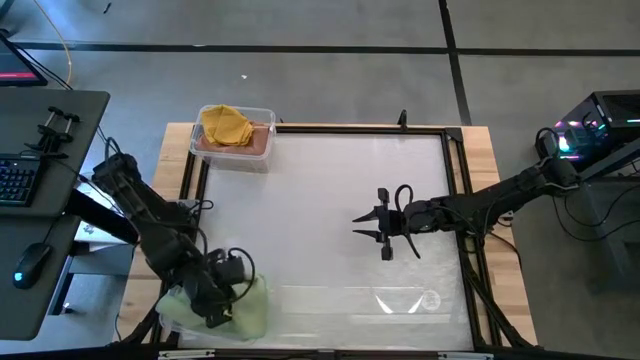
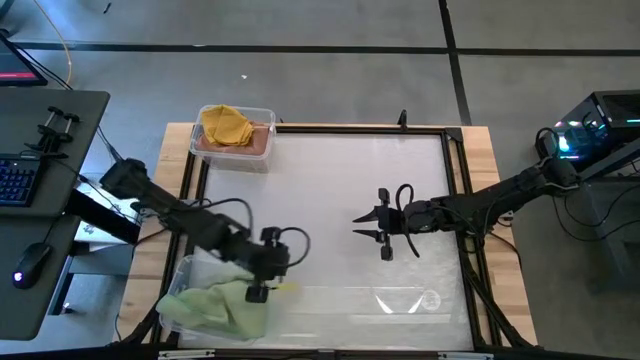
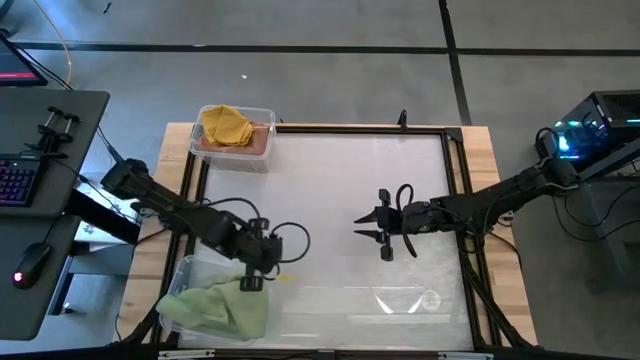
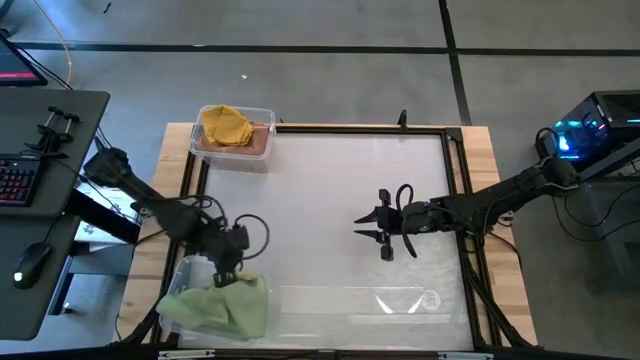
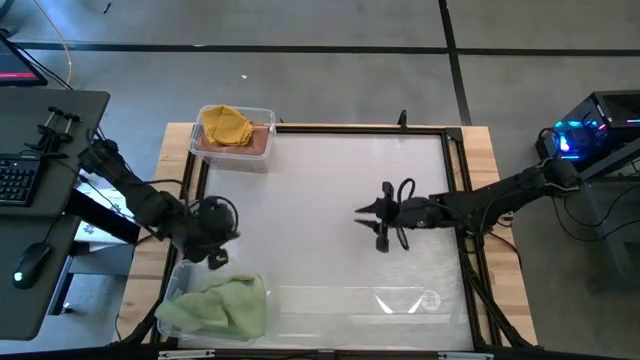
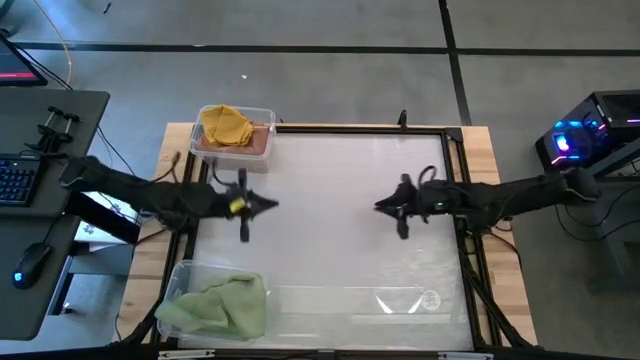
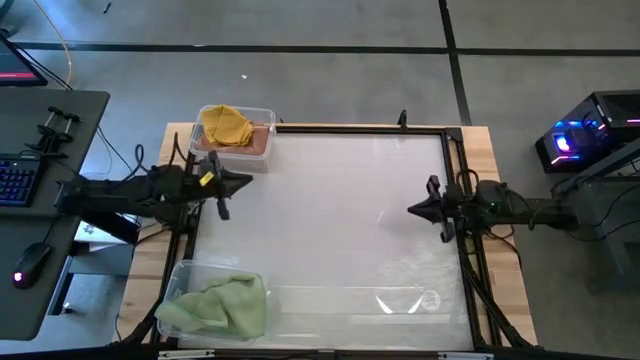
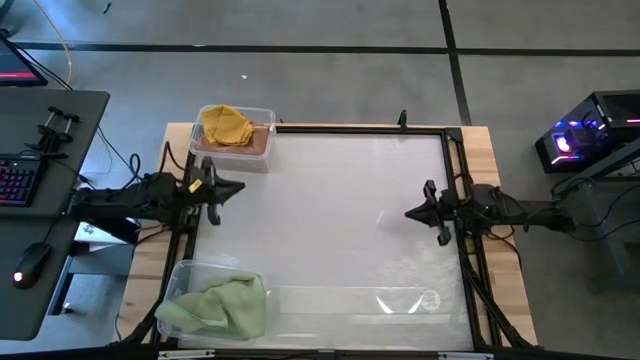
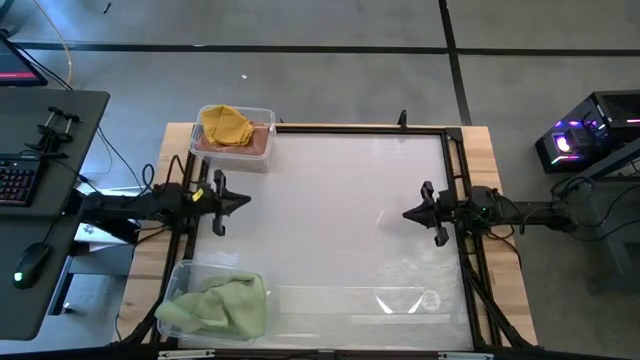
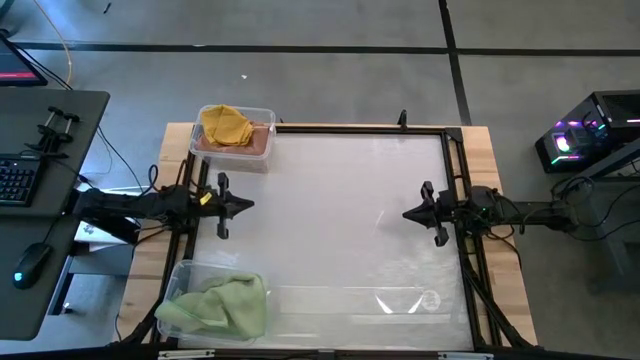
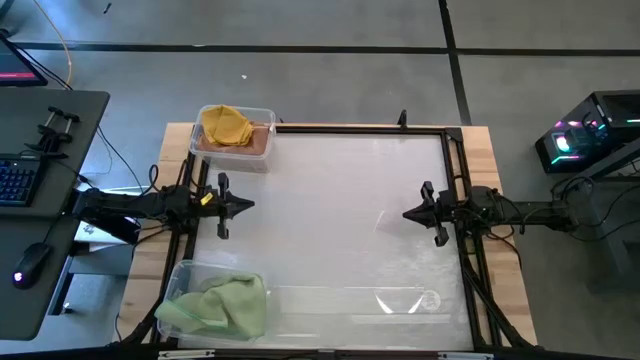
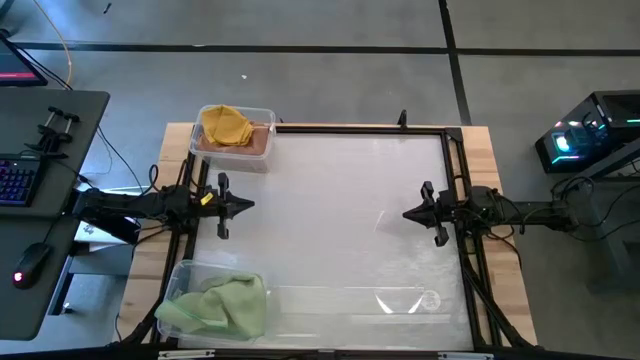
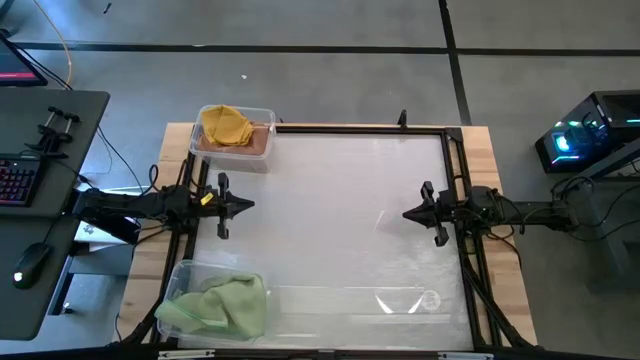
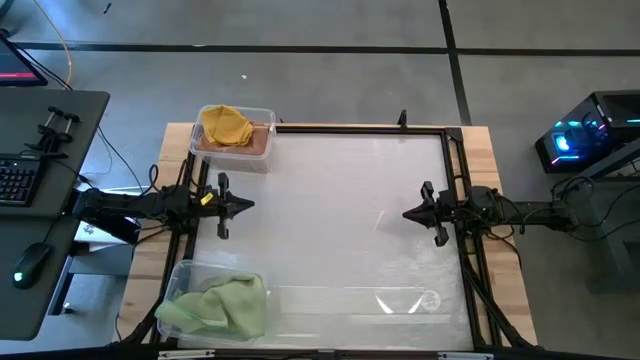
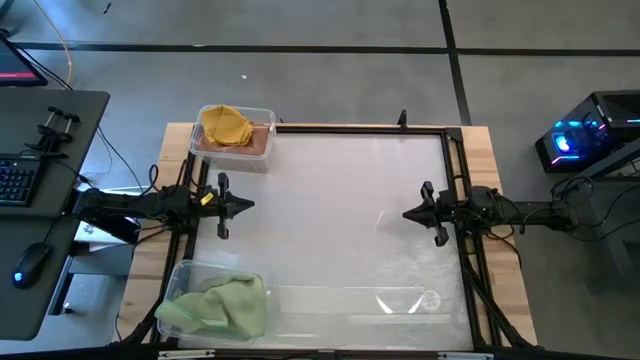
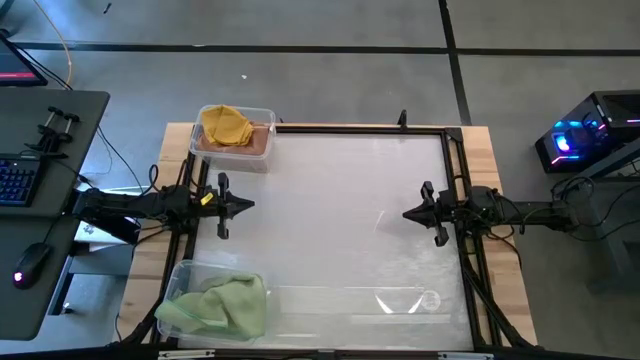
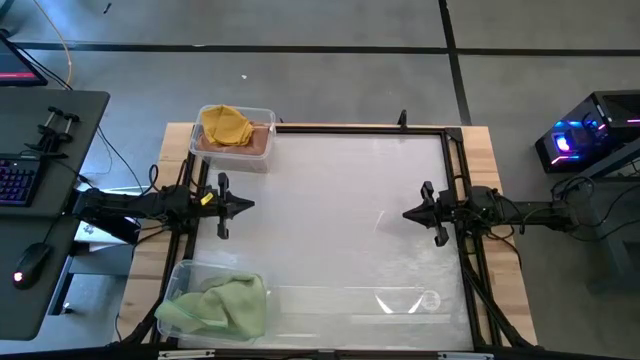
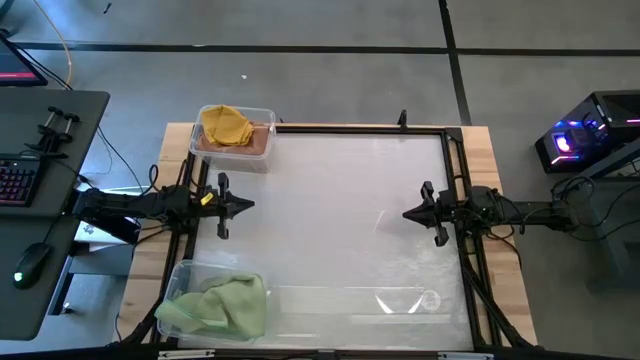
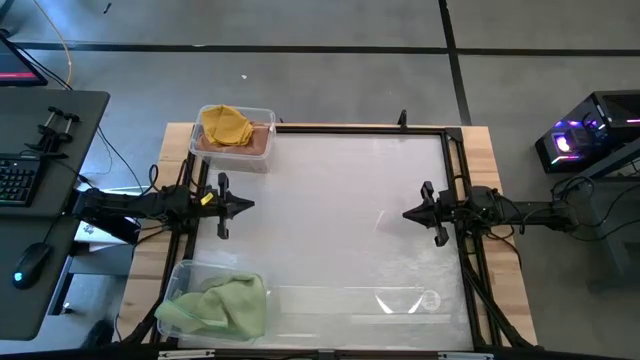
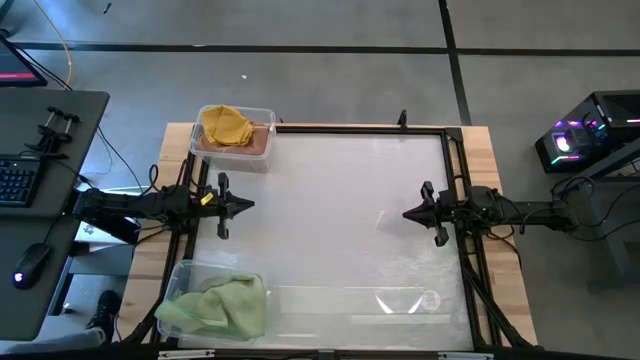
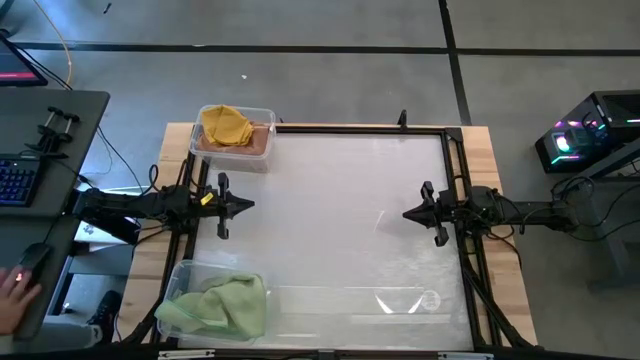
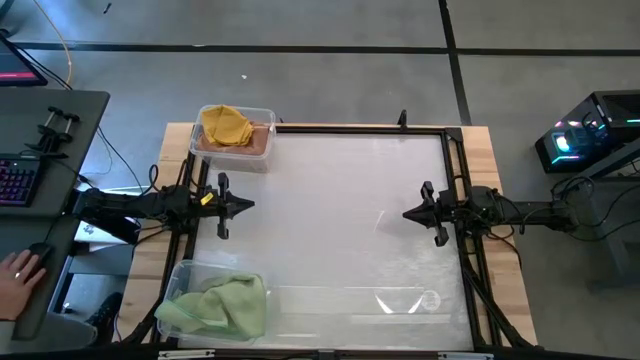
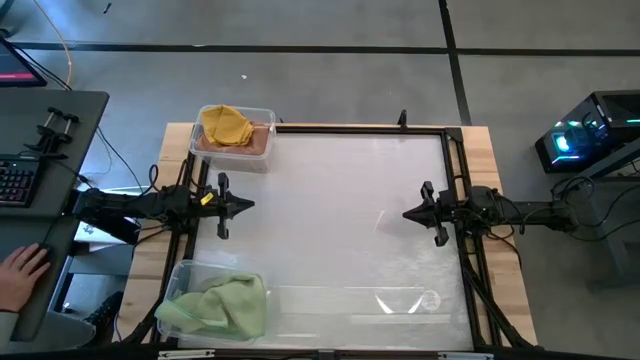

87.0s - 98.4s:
Task: Sort towels by color in basket
Return to Home Position

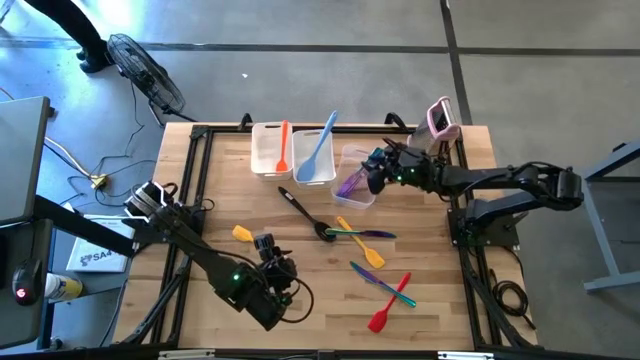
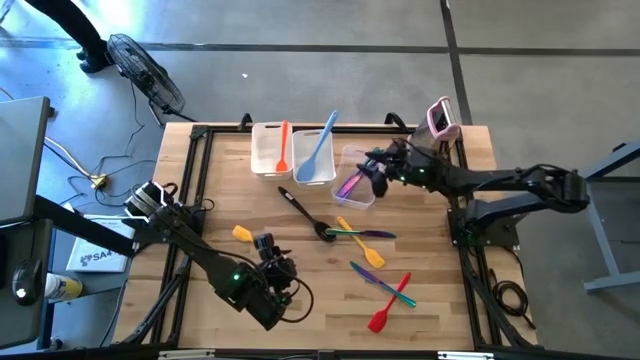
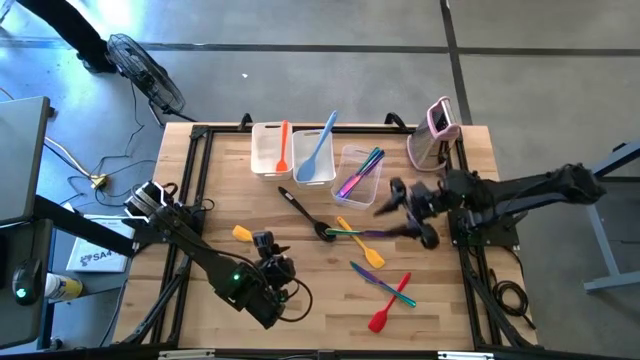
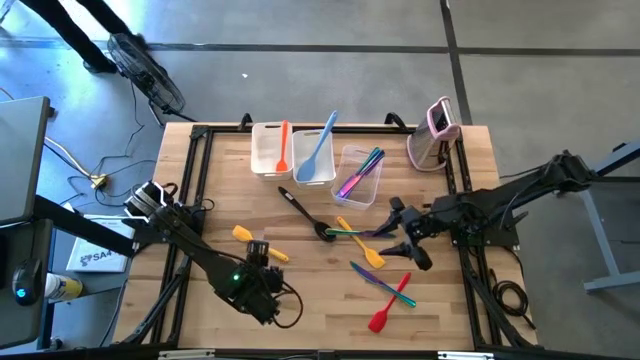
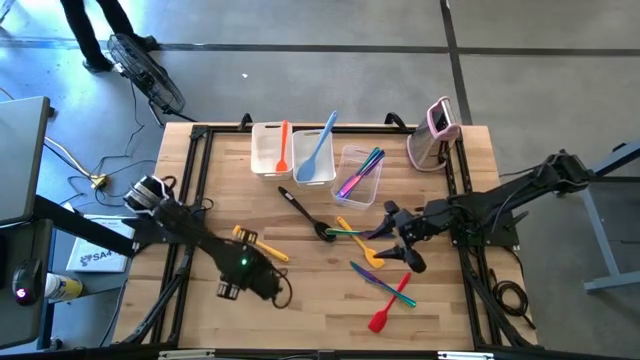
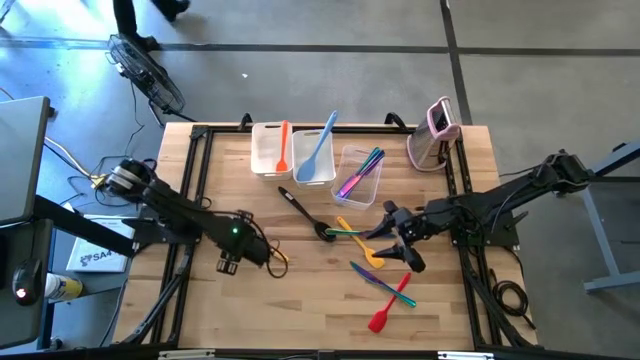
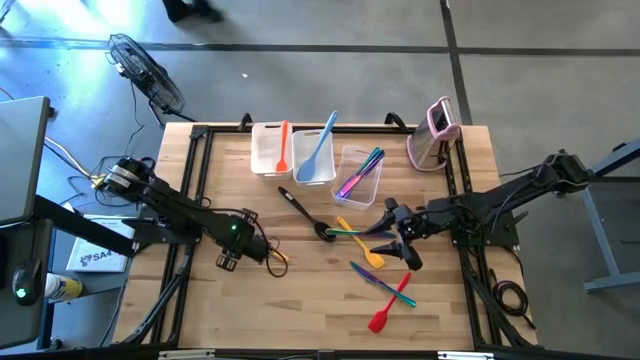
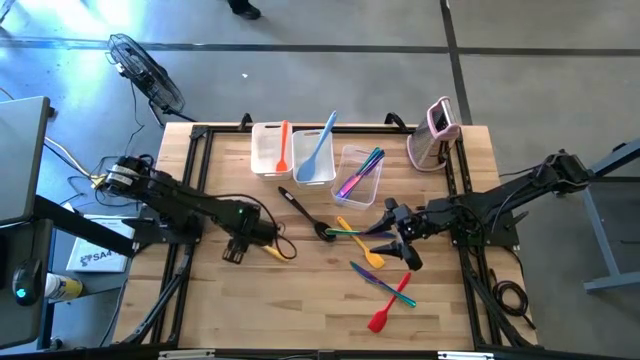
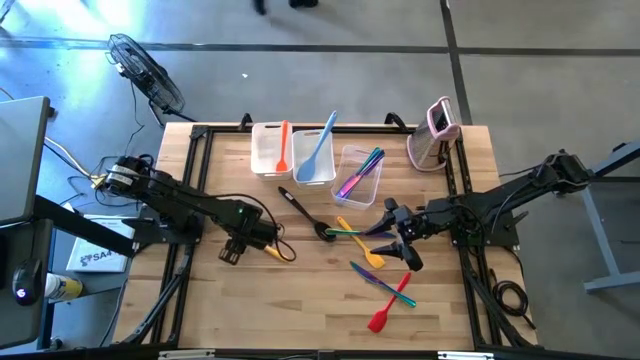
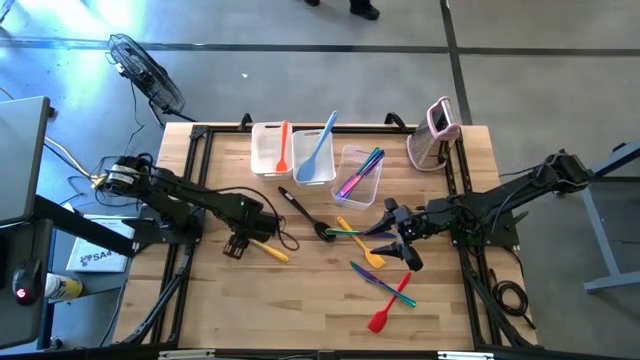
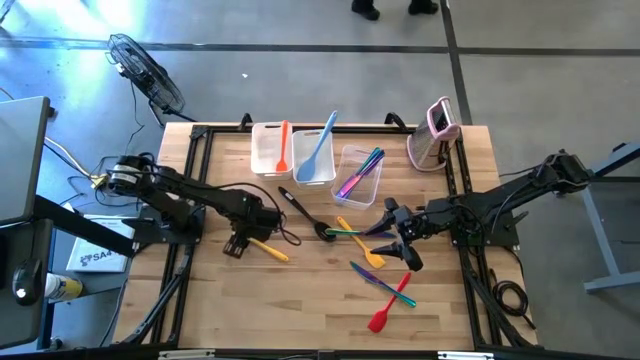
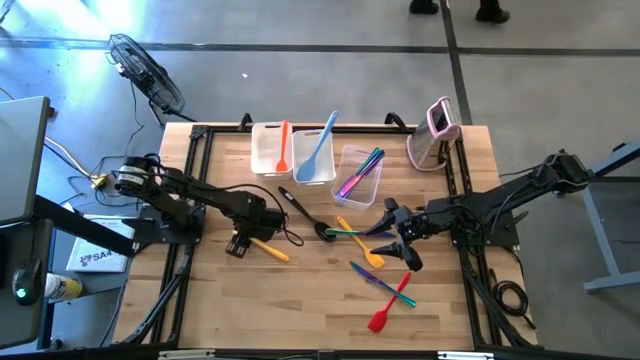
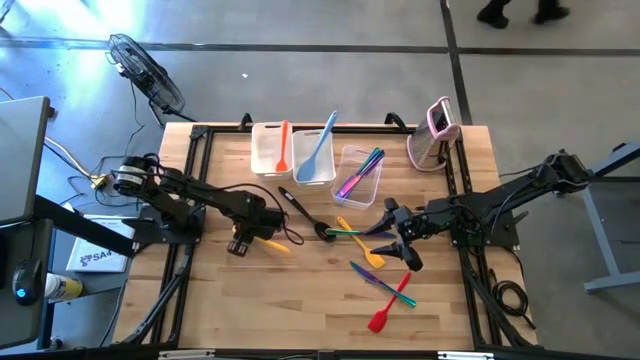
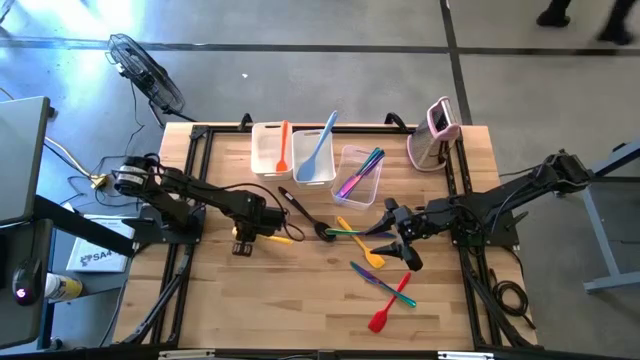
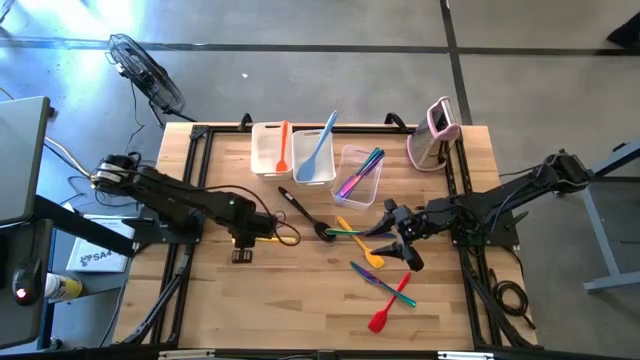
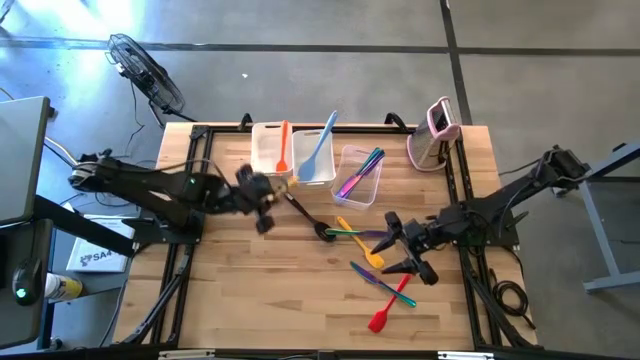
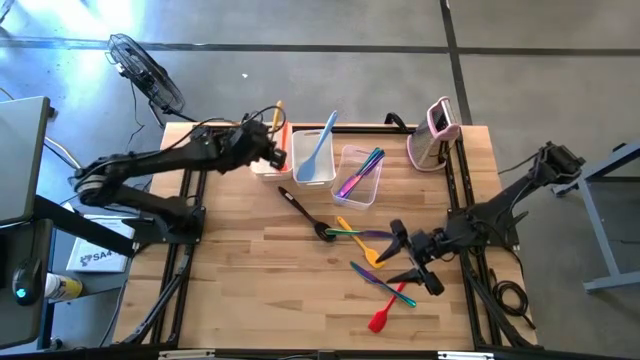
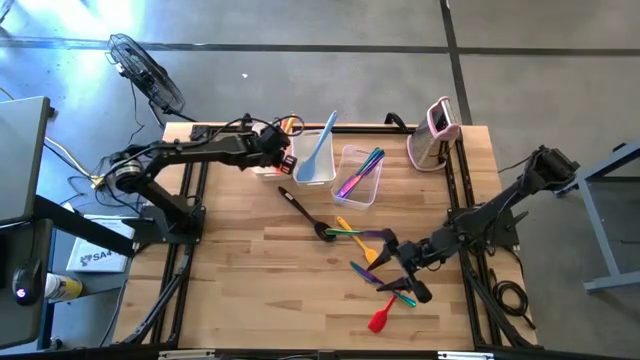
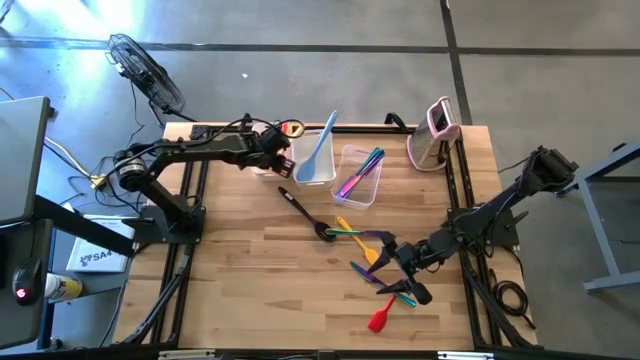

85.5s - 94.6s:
Task: Pick & Place Kitchen Items
Put the yellow spatula into the left white bin

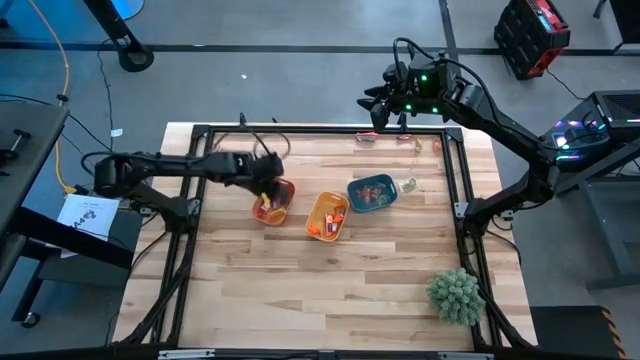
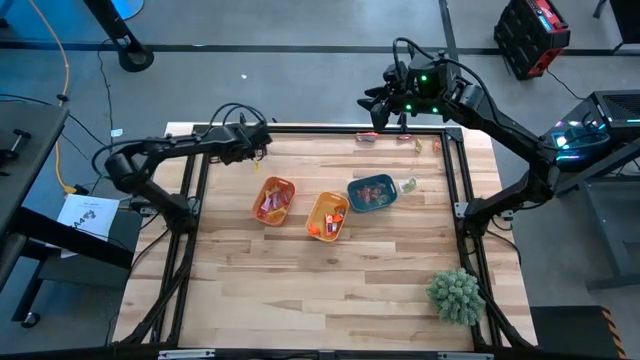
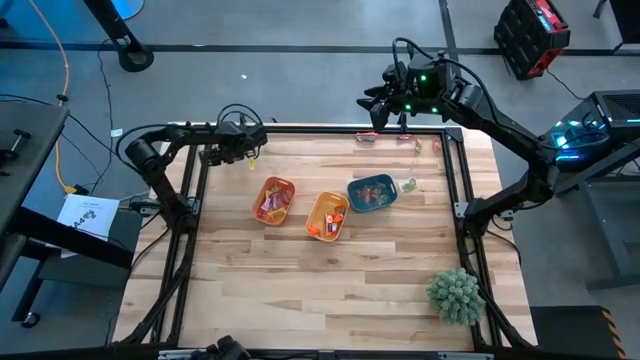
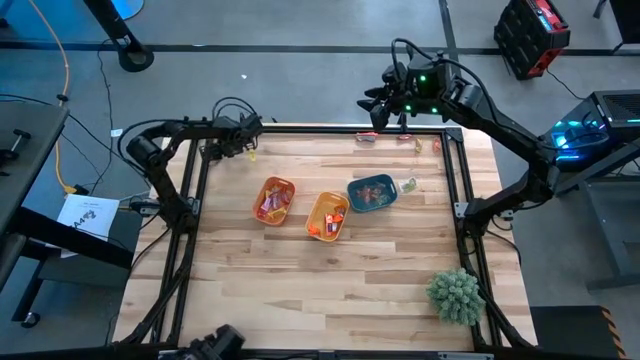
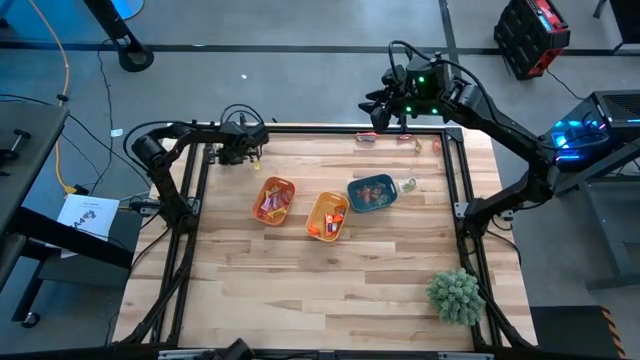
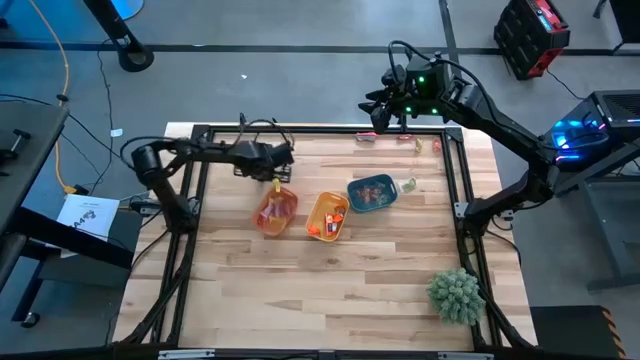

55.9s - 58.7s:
Task: Sort candy
Move the purple candy
